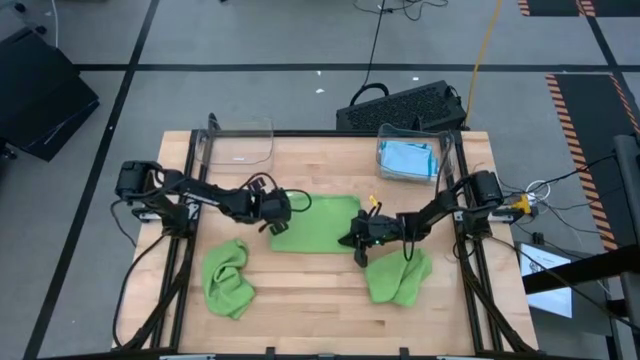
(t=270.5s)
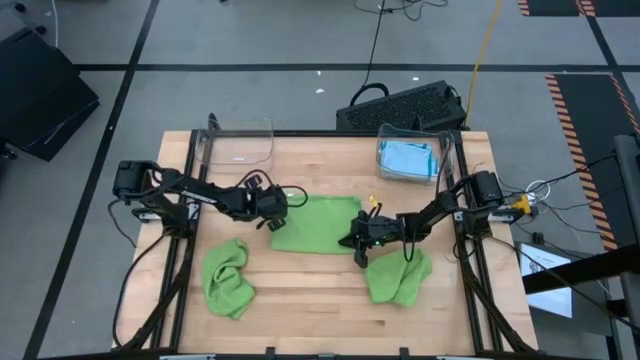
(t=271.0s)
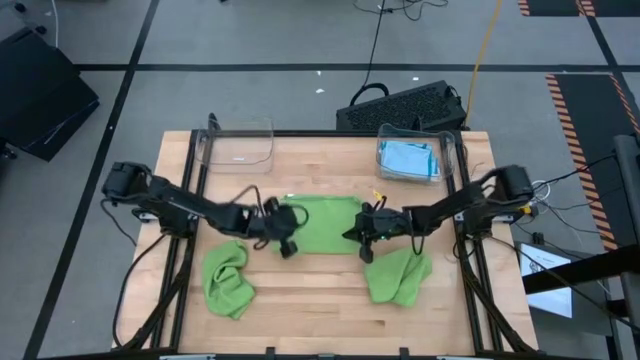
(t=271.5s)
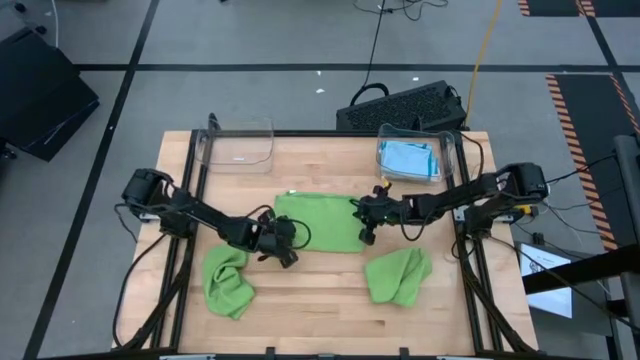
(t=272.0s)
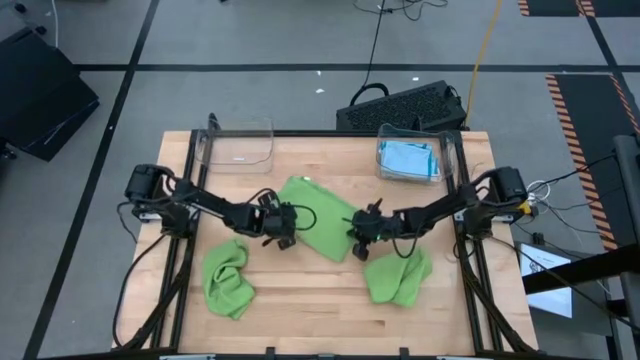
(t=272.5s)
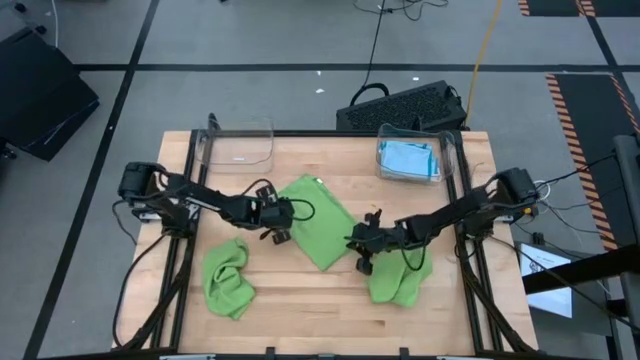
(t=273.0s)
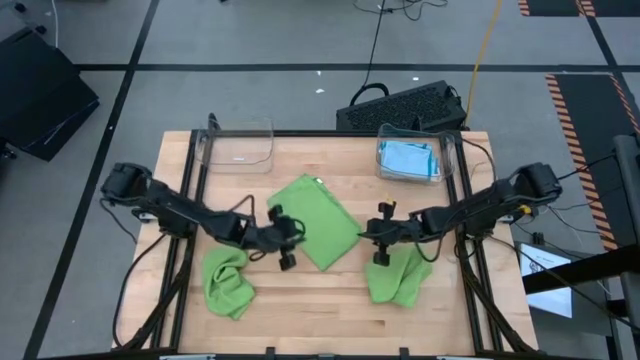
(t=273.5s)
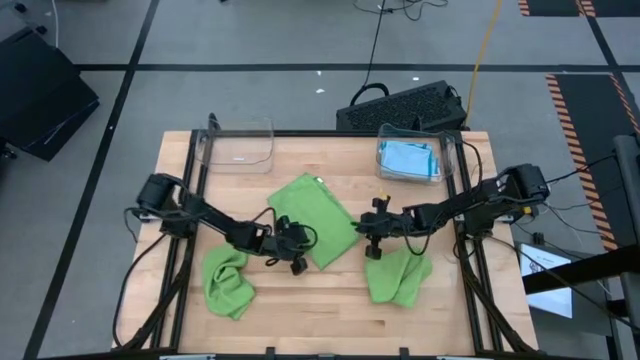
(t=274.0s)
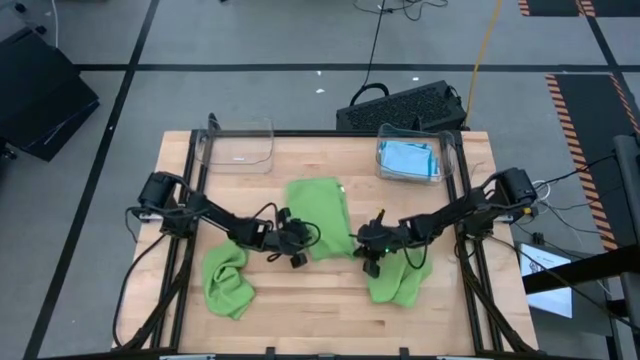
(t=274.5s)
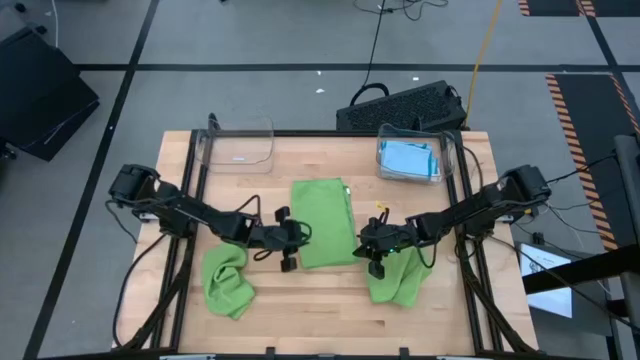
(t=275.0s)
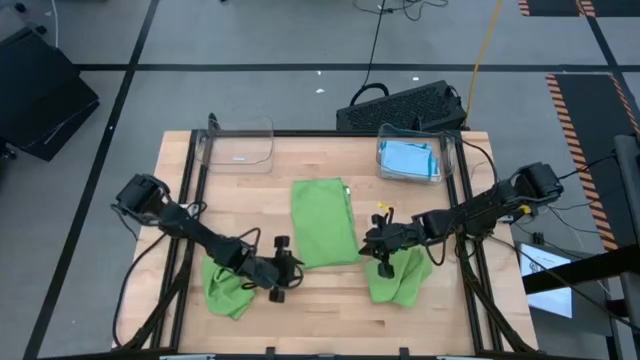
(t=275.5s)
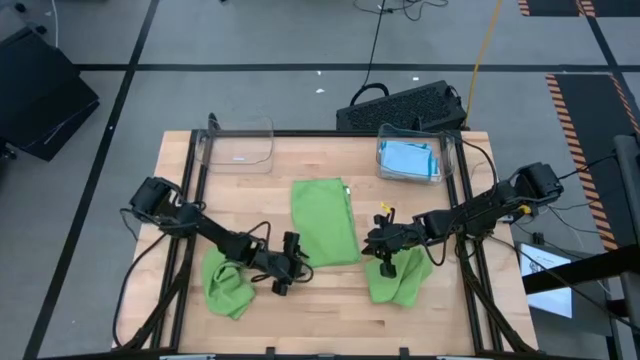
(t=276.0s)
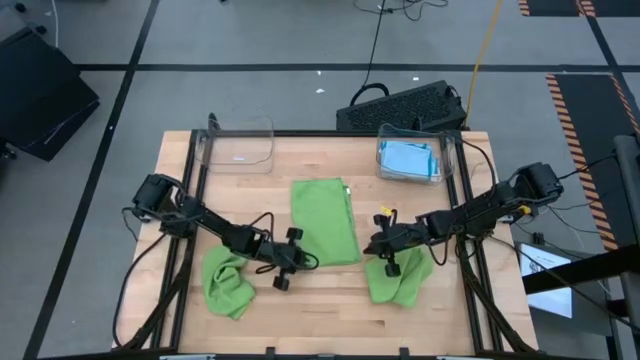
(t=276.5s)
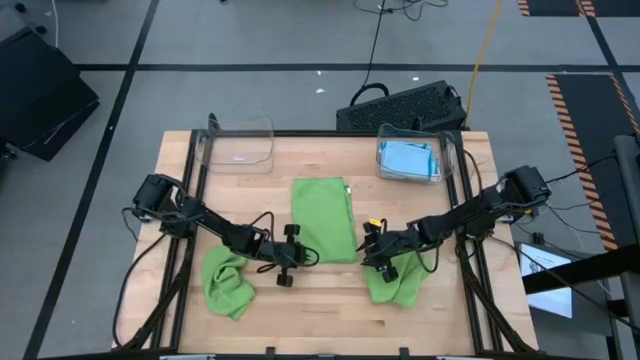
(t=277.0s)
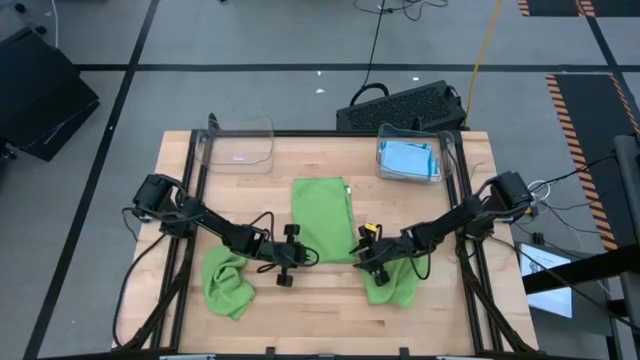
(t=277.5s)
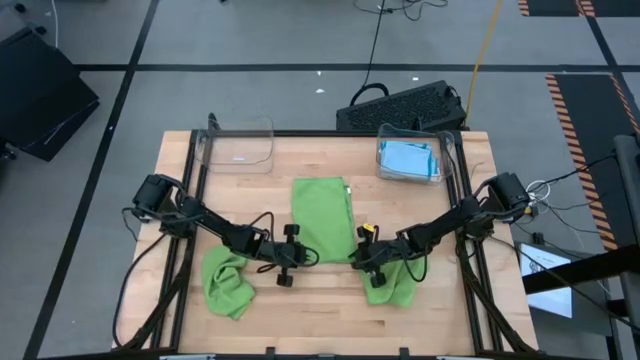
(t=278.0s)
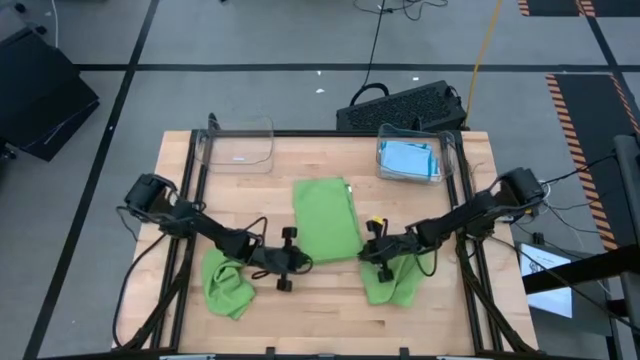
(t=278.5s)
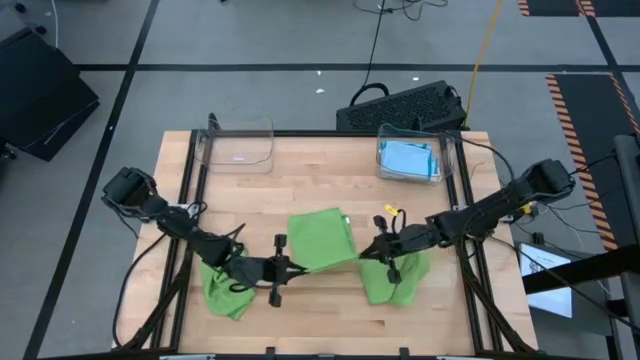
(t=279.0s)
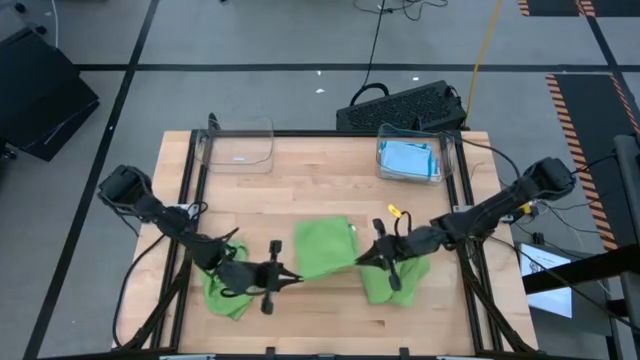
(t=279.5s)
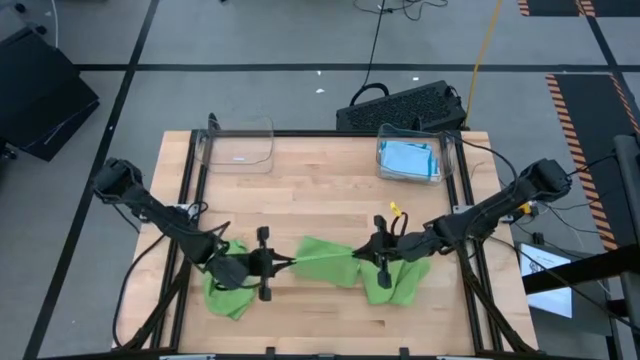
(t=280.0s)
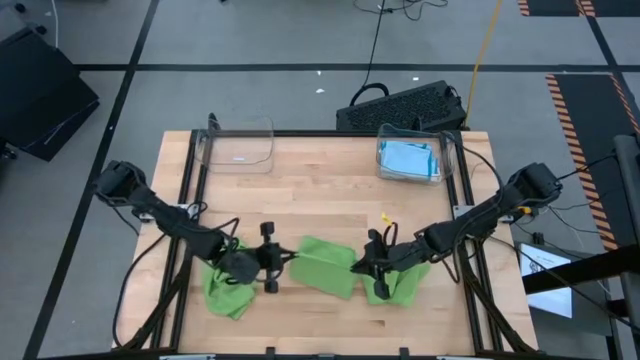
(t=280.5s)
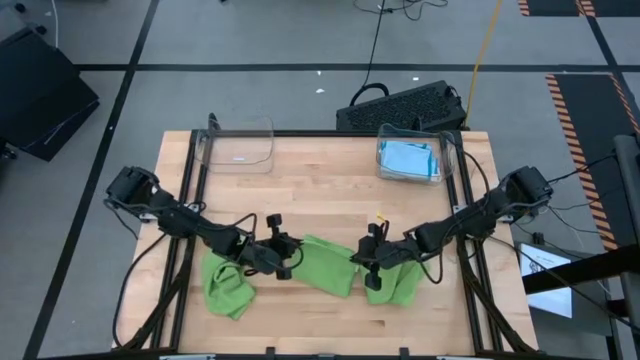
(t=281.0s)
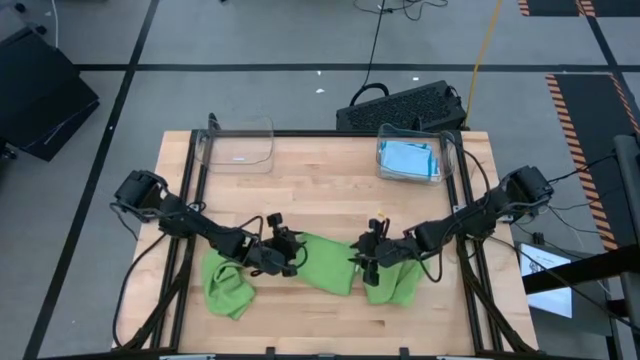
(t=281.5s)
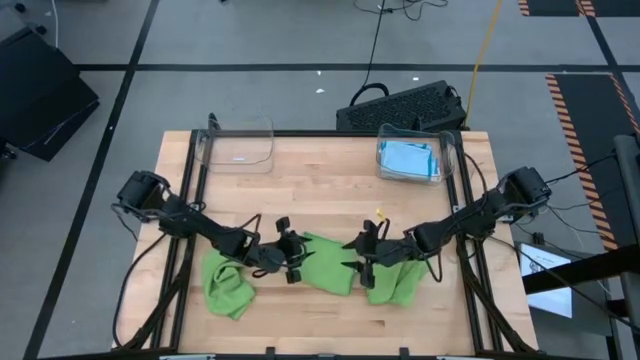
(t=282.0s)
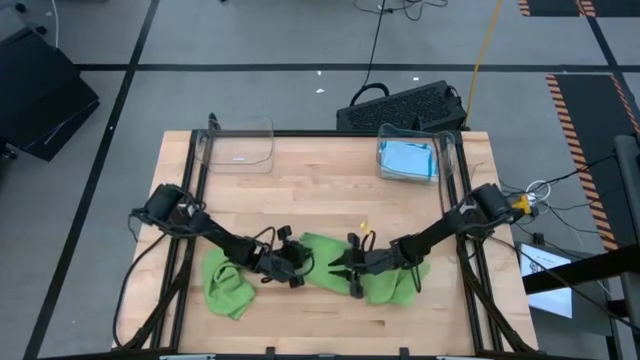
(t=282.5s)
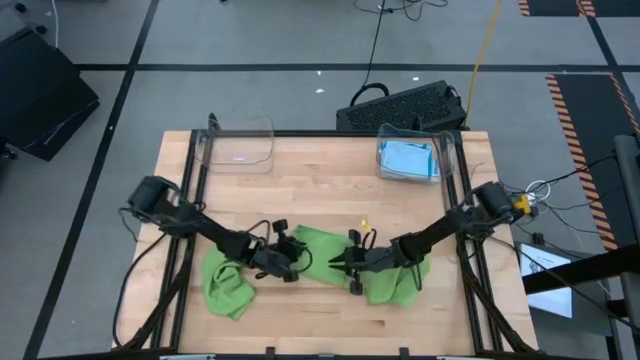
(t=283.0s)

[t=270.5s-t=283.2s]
Task: Fold microfiber towels
Fold the center green microfiber cloth

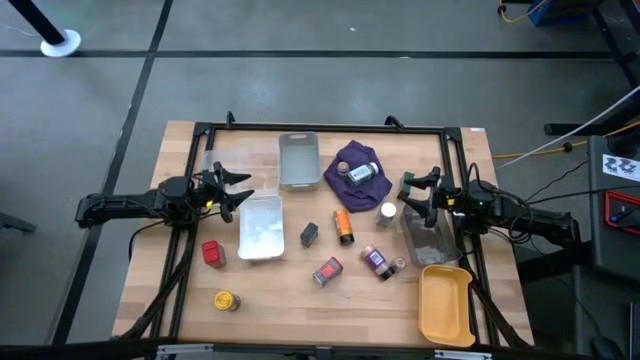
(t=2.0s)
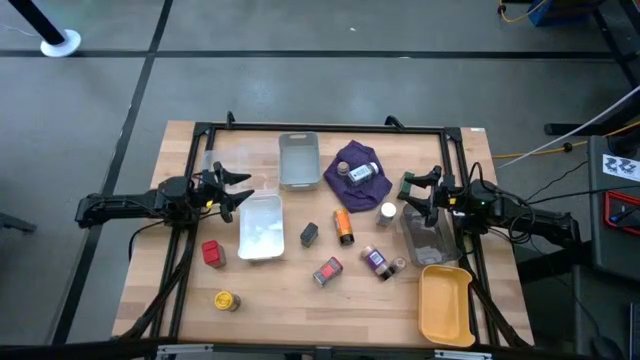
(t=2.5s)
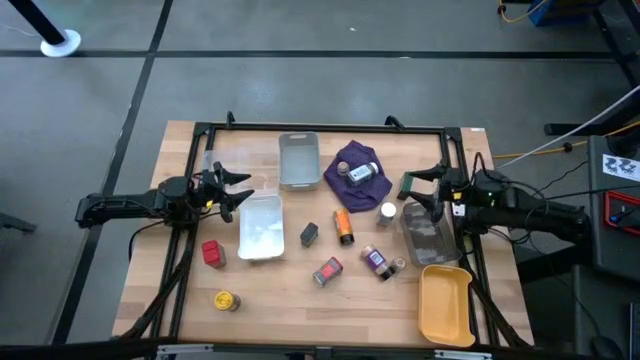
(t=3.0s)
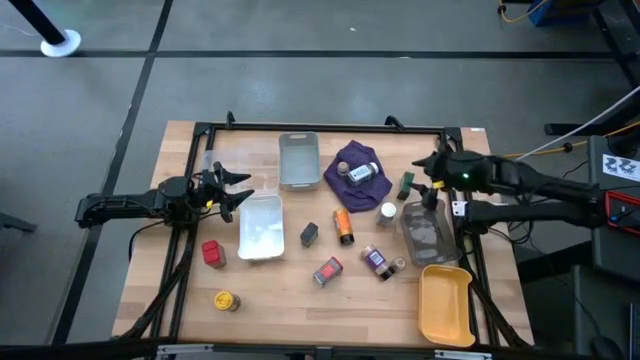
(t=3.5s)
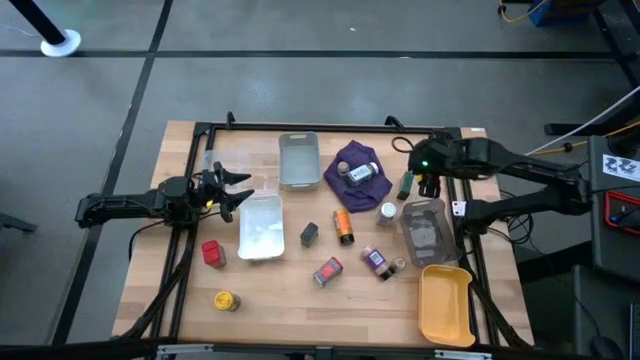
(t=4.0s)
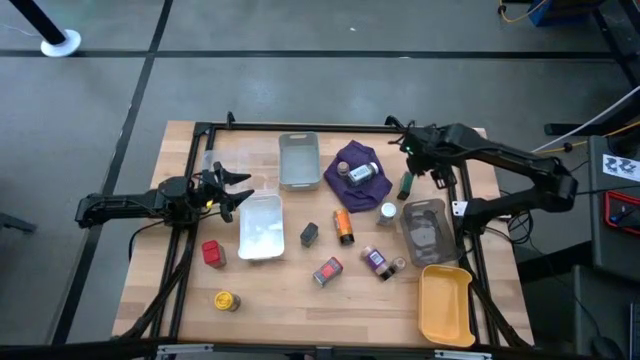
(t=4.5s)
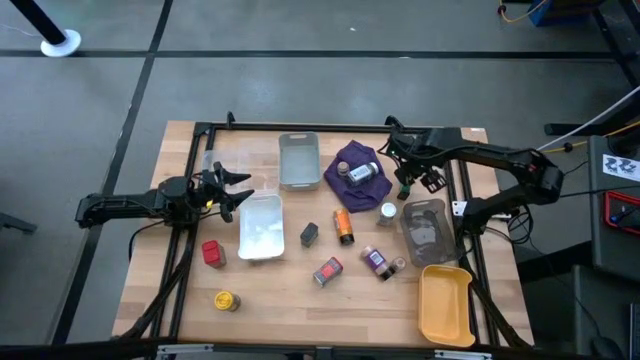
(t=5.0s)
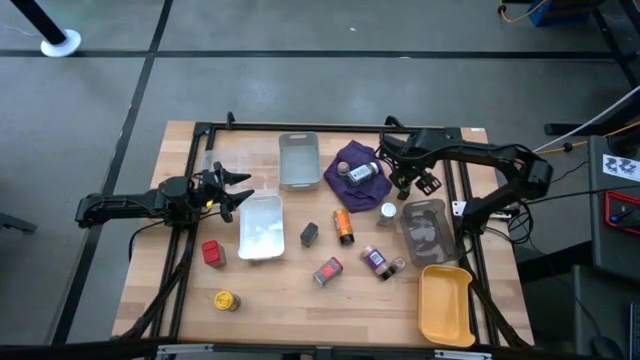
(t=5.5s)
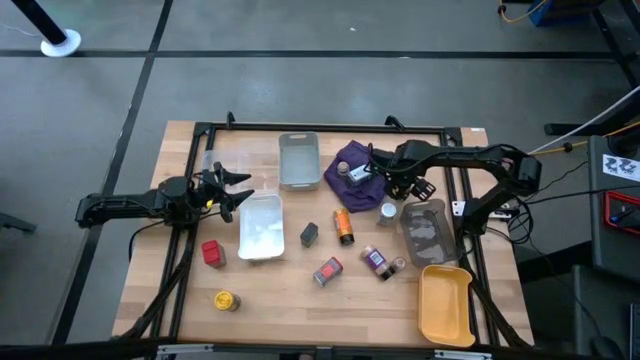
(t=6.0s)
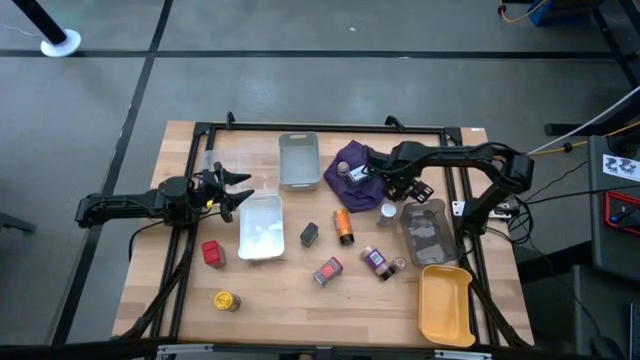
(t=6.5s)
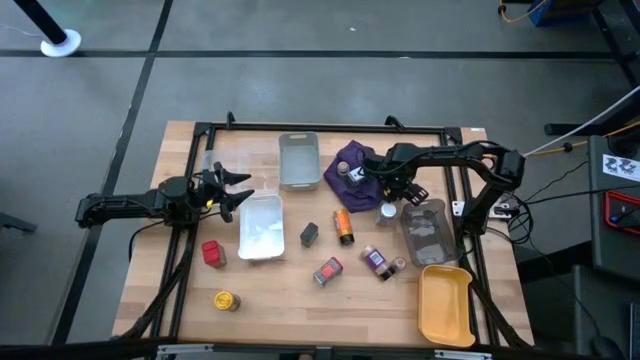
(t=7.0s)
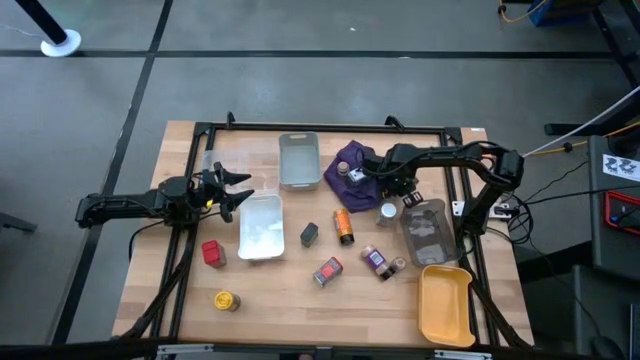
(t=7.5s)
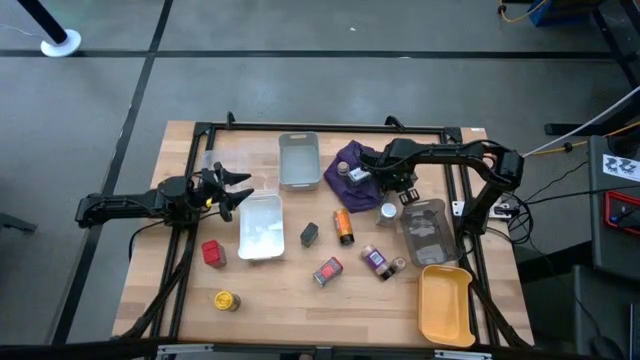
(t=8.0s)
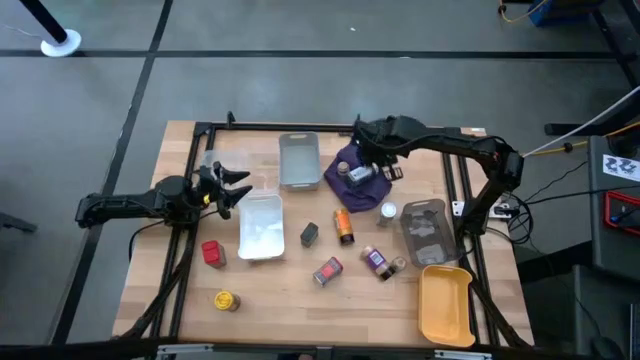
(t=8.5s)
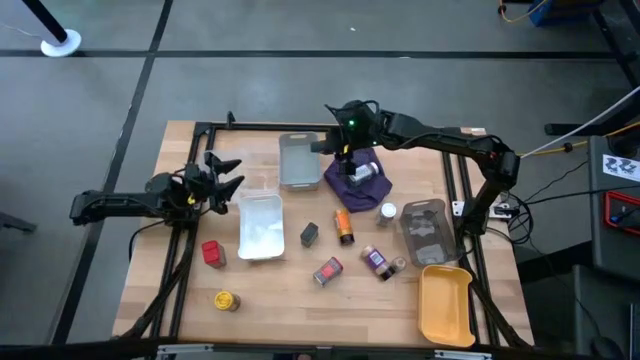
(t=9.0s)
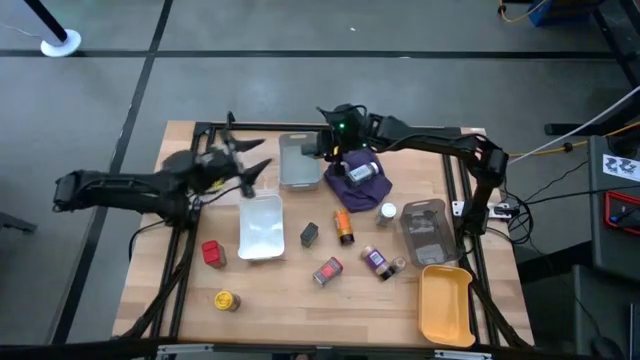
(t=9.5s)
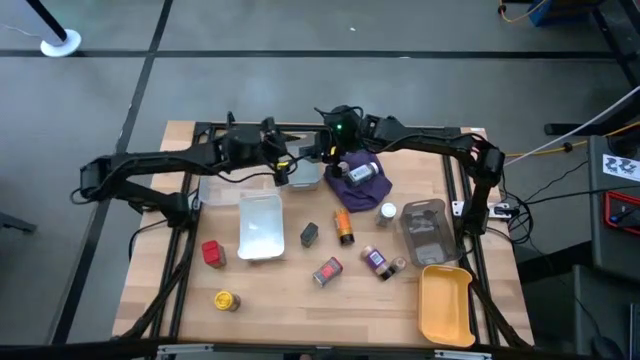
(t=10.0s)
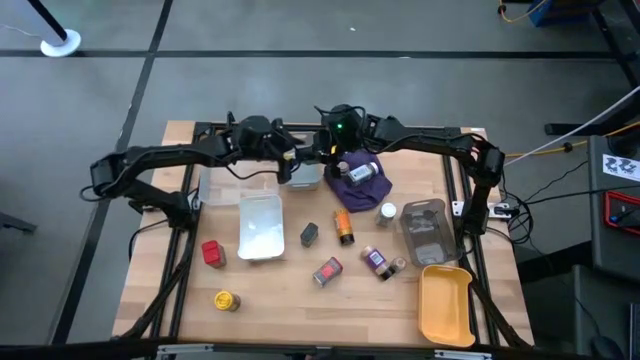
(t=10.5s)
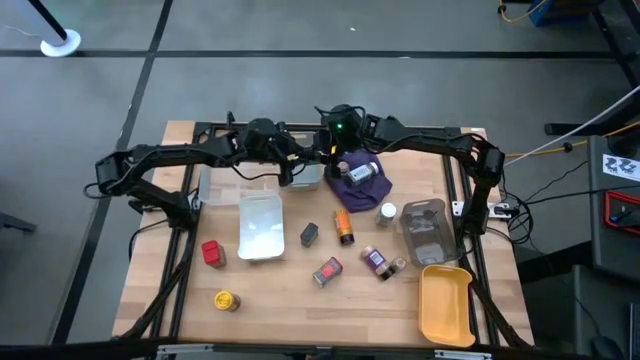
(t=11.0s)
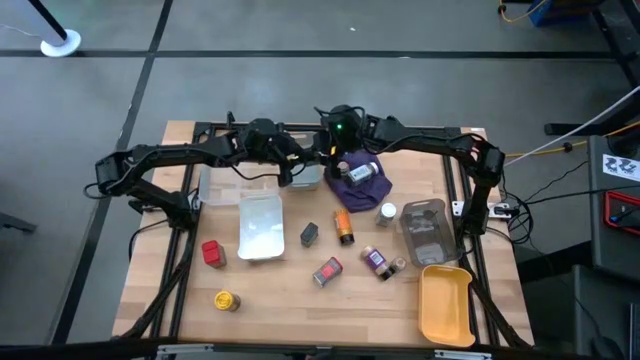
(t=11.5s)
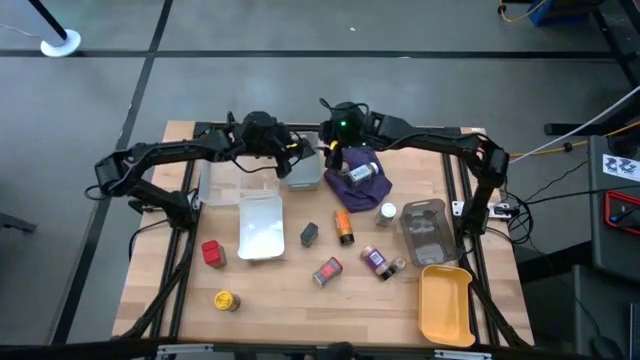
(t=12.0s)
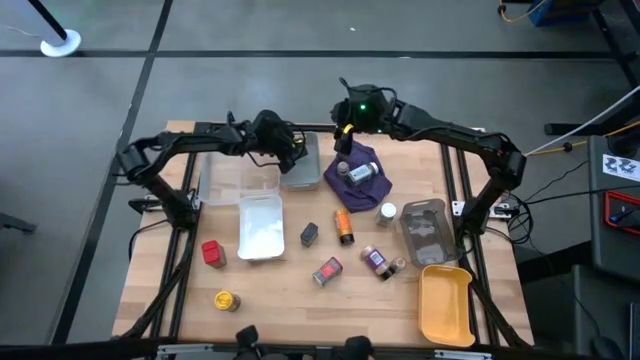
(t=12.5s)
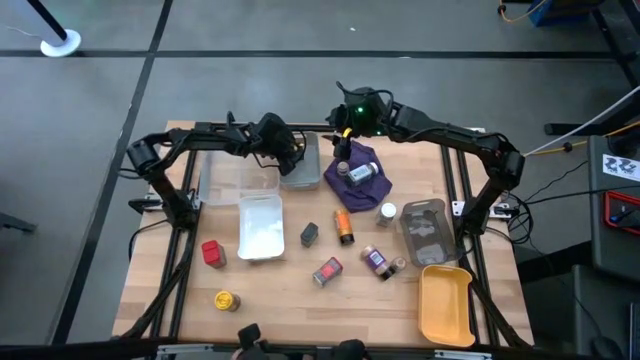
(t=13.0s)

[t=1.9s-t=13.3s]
Task: Sort spices by type
Put the top right black seasoning can into the gray bin
